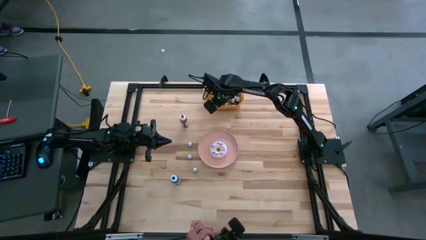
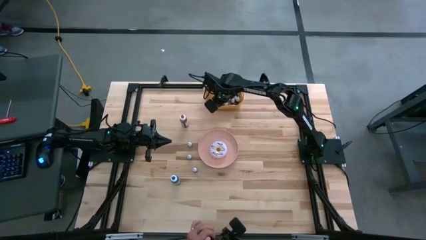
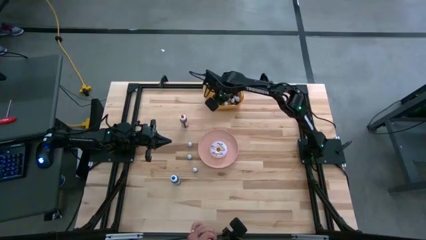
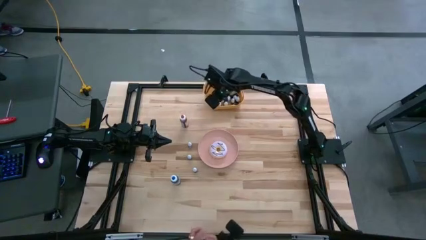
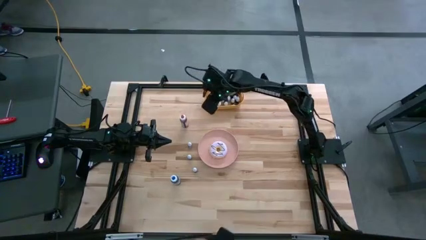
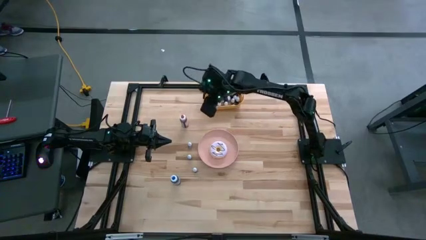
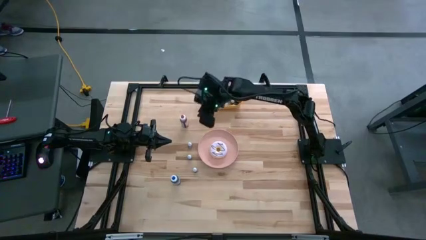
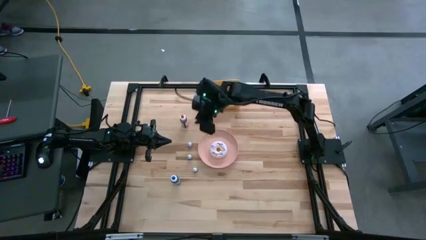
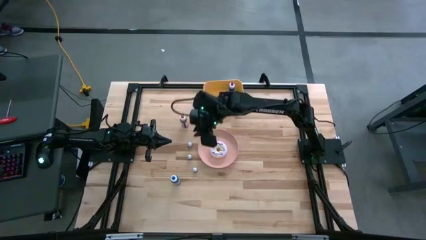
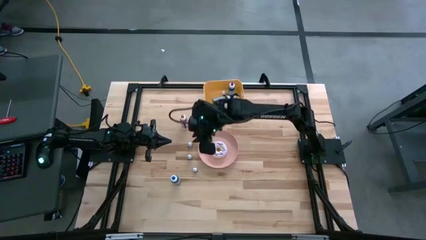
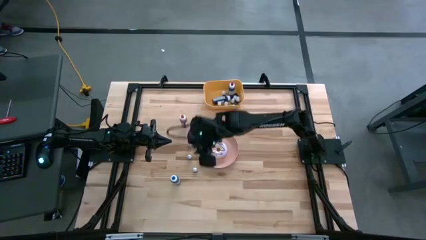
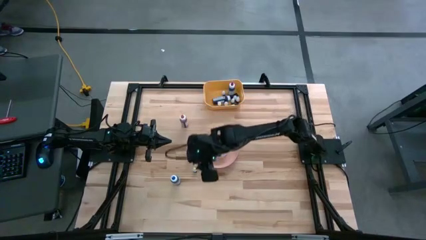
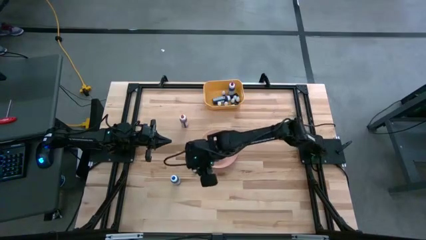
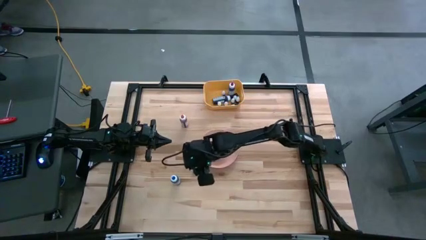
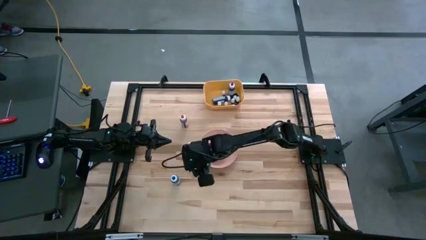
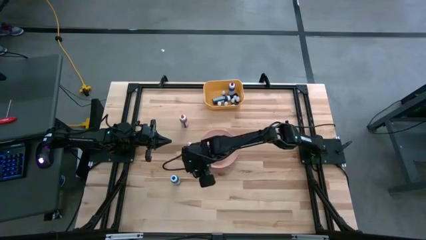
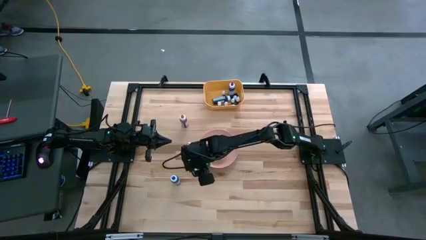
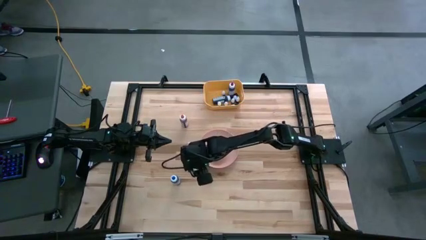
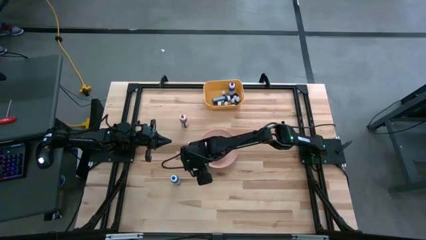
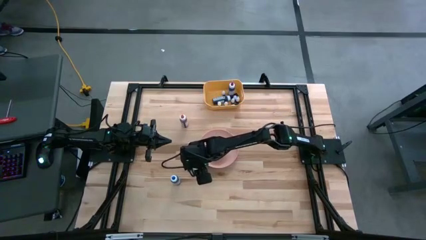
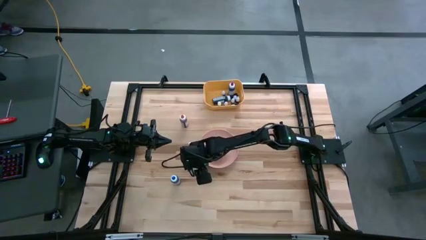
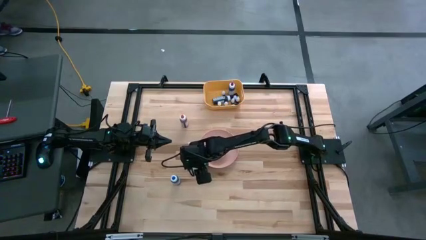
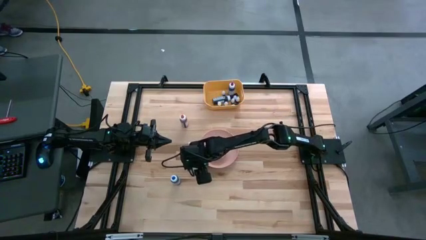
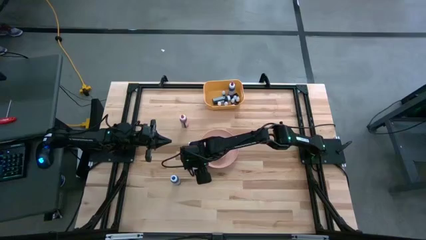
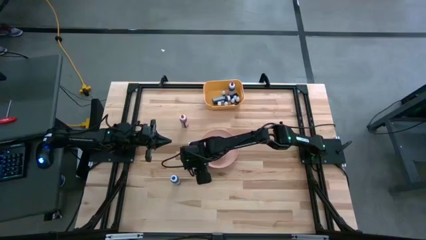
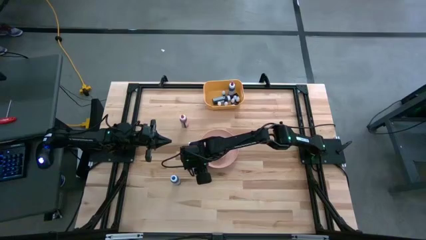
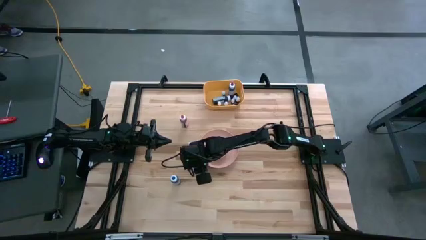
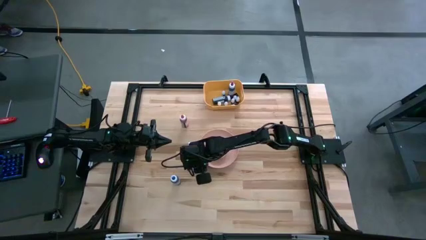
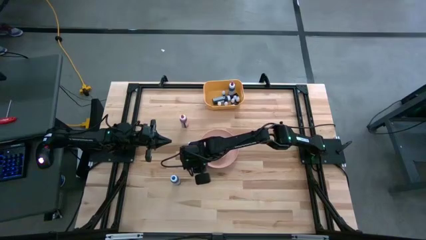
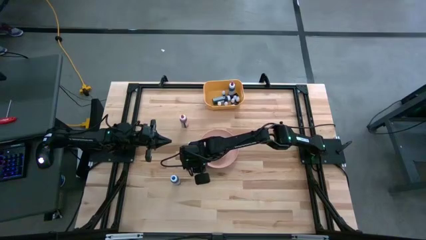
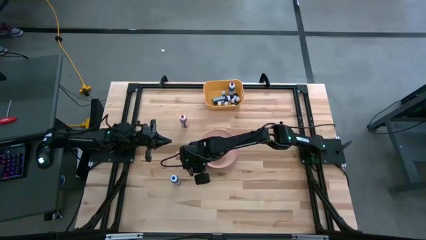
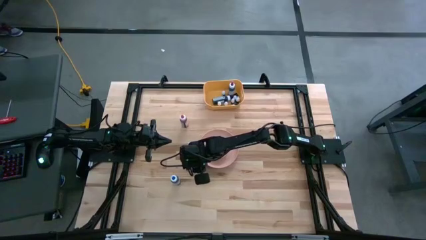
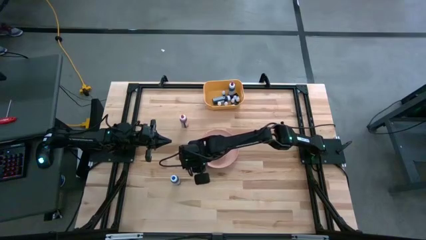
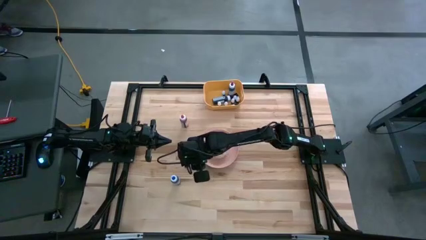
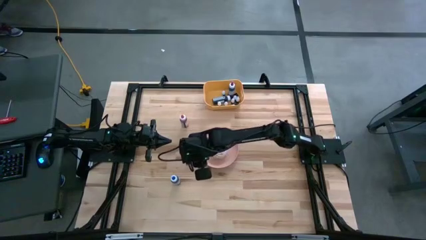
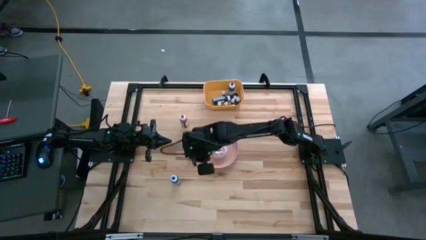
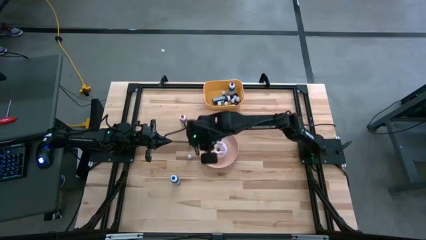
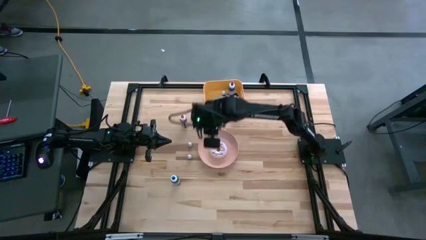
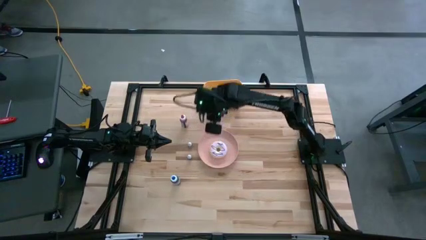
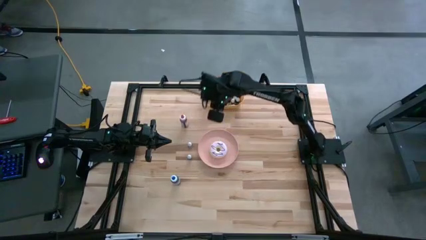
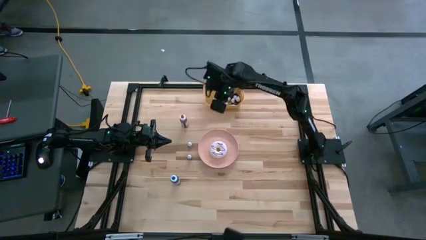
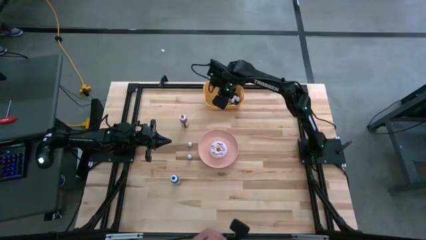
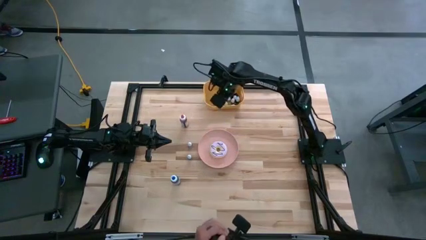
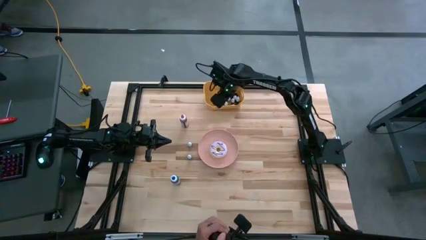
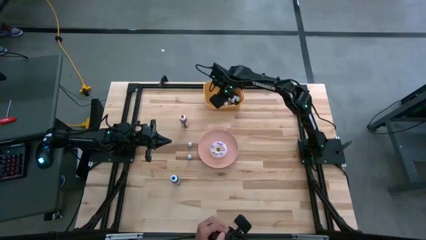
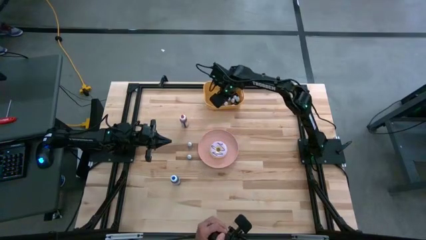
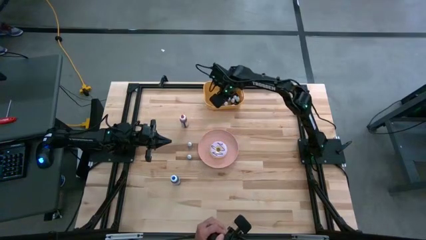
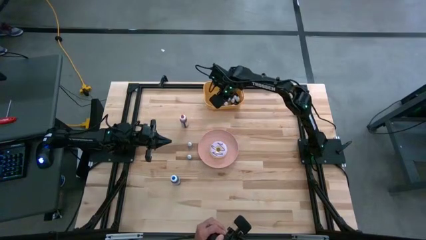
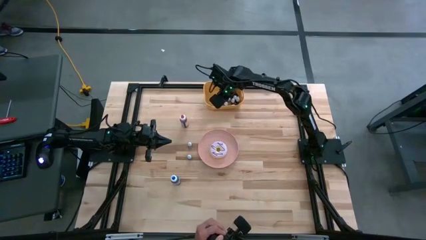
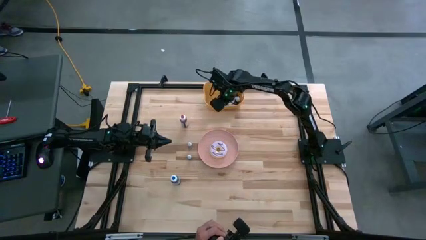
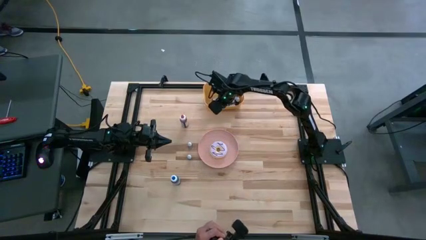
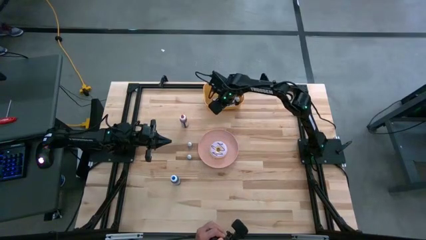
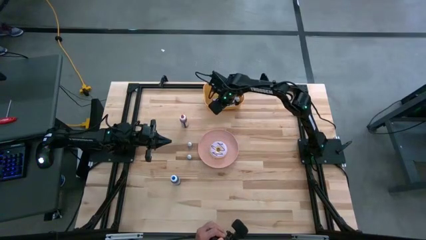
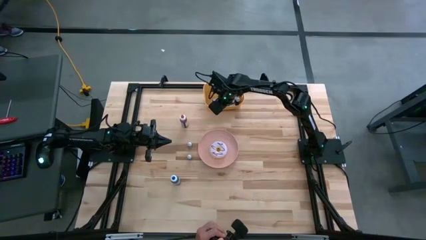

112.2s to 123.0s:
Task: Pick & Place food coloring
Put the small black food coloring bottle into the orange bin

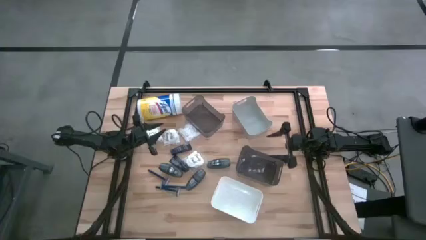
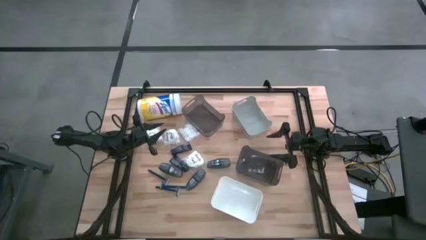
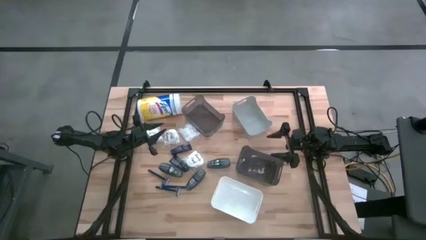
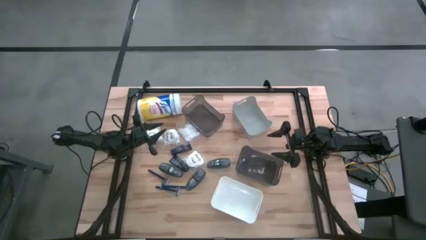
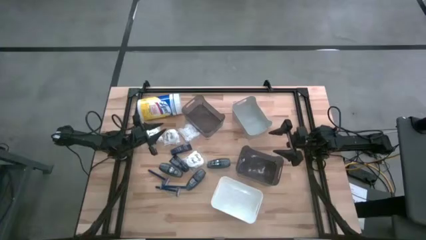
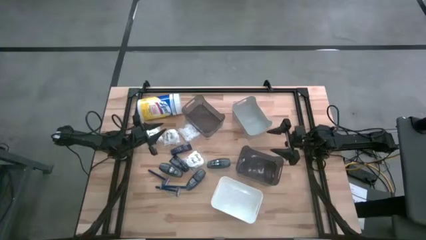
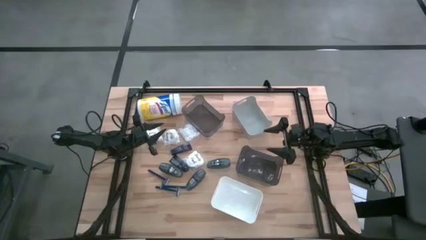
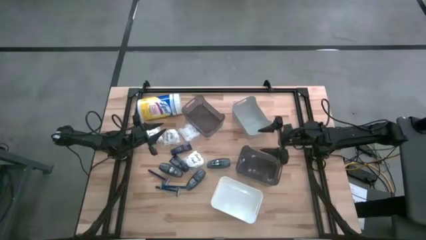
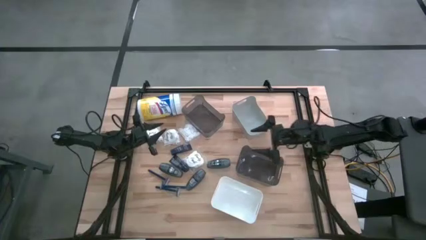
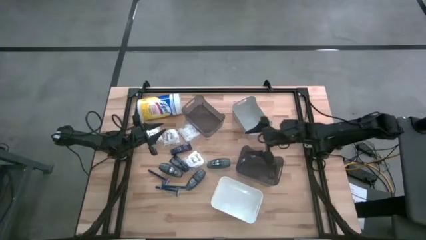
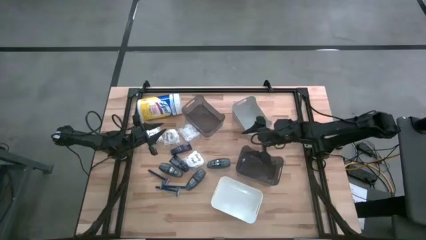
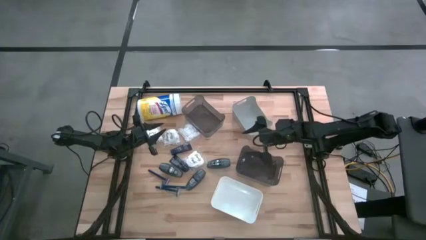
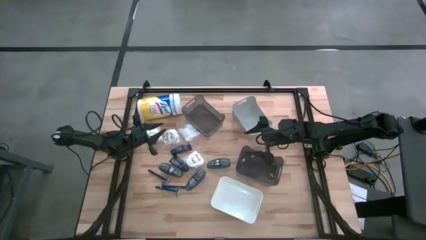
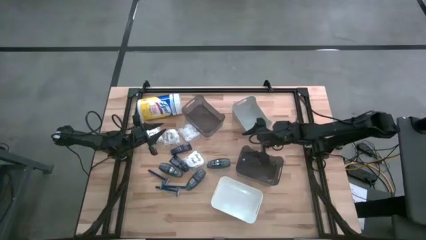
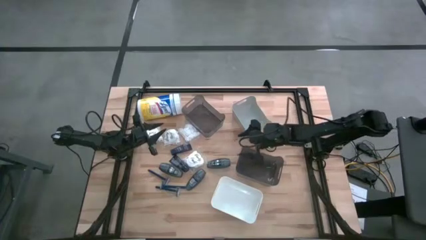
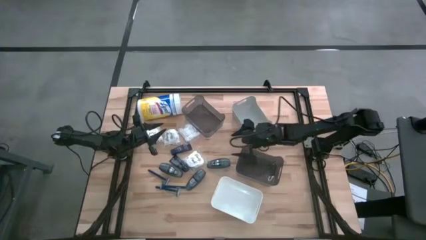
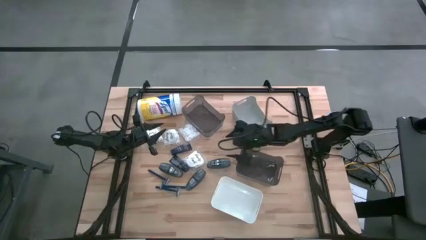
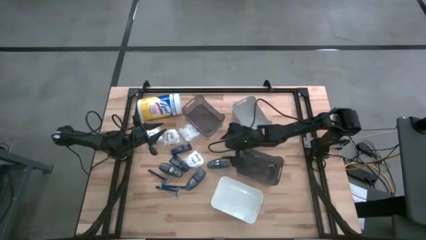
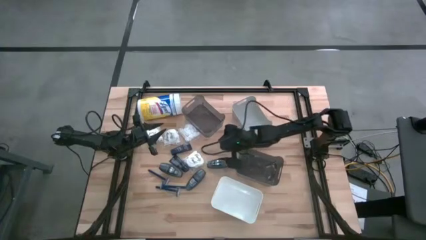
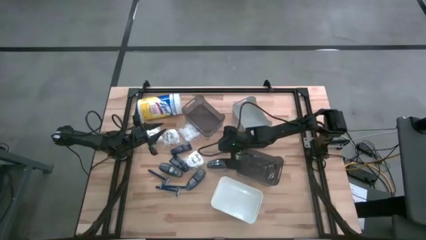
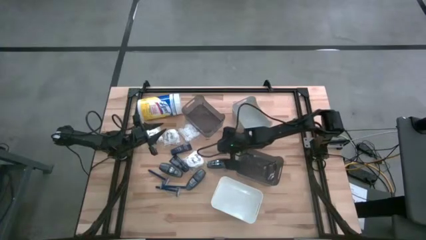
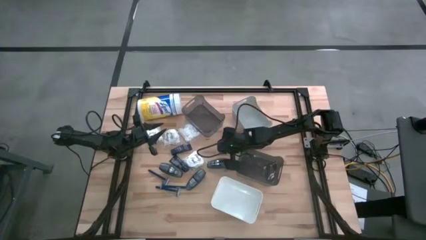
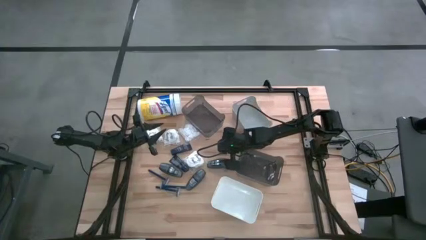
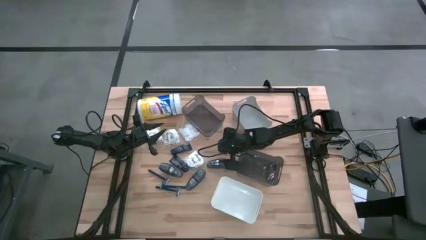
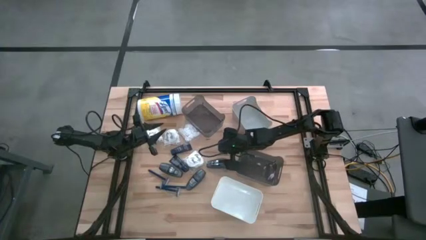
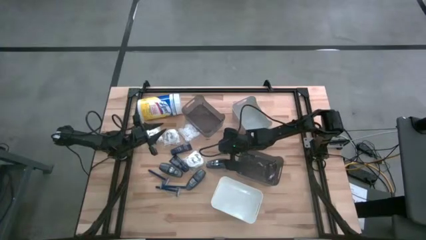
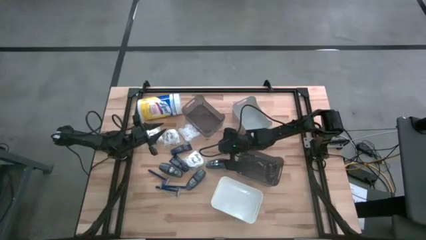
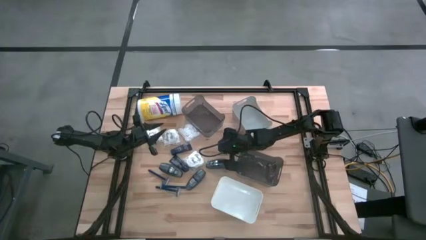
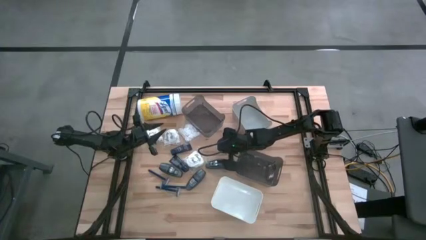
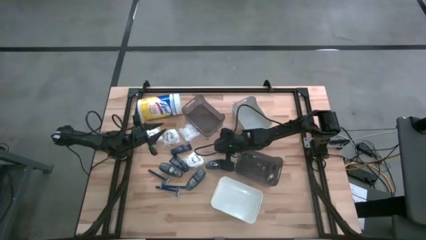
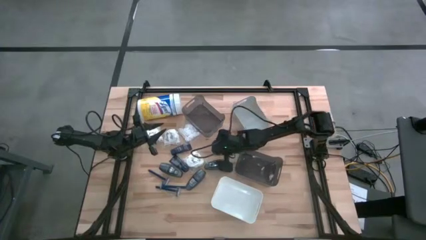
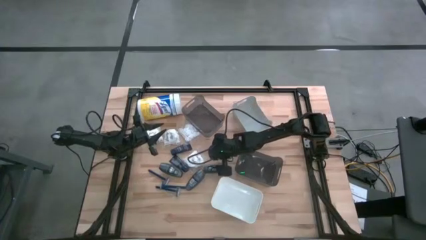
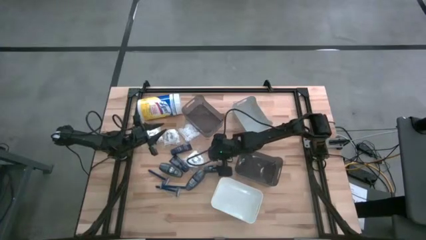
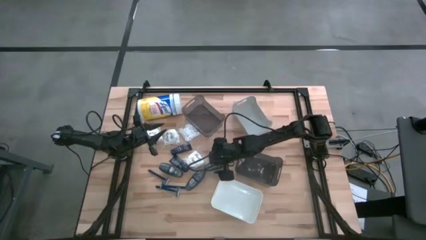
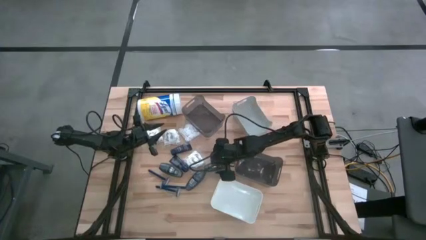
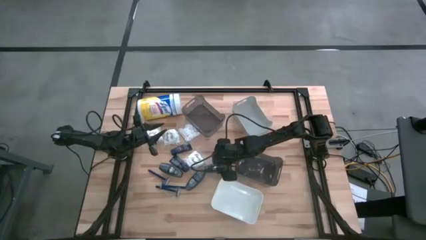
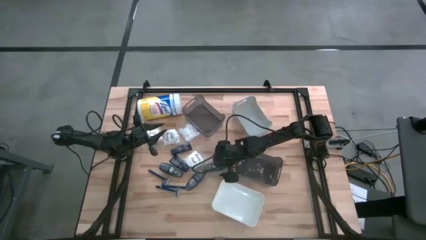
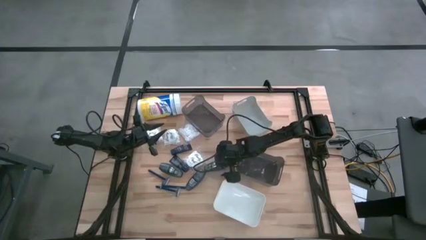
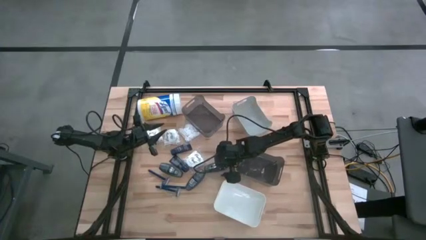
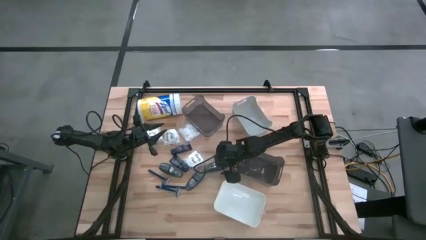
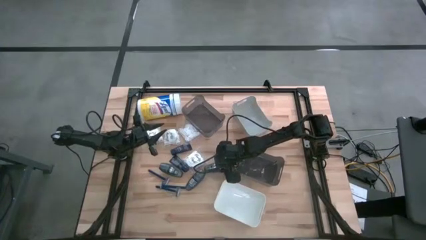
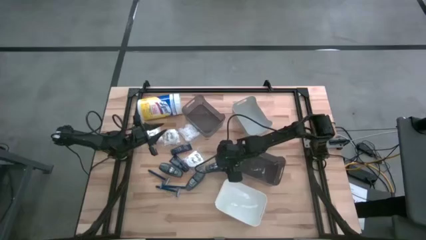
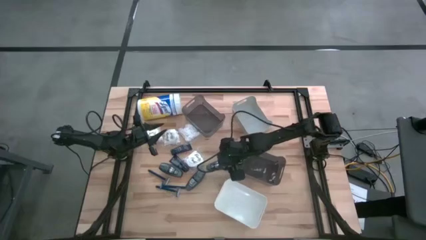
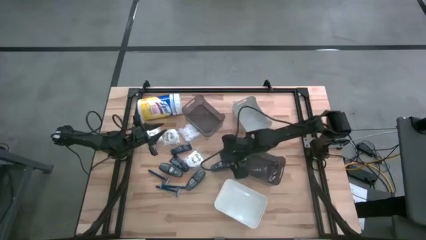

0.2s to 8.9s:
Task: Pick & Place Travel size toiletries
Put the gray deodorant into the gray bin
